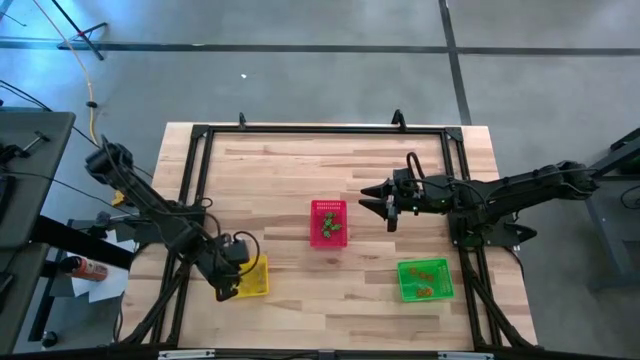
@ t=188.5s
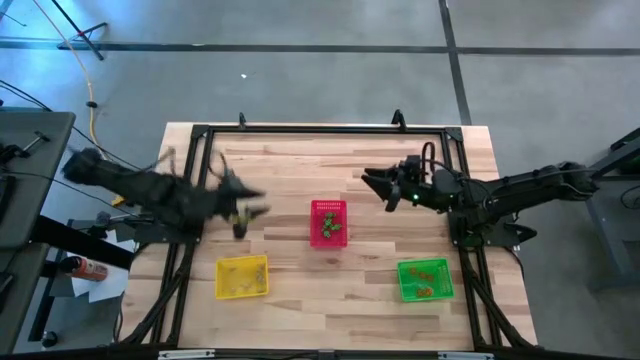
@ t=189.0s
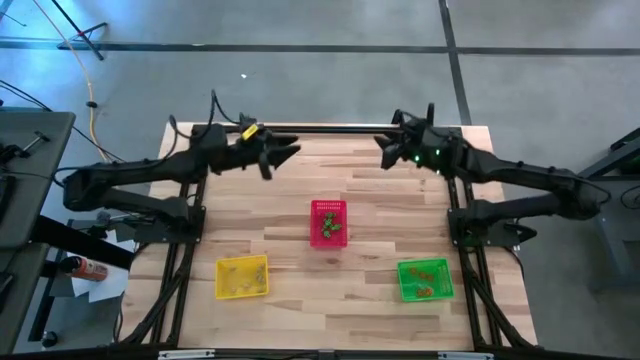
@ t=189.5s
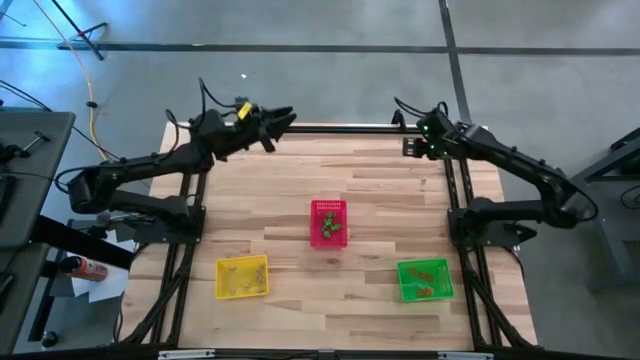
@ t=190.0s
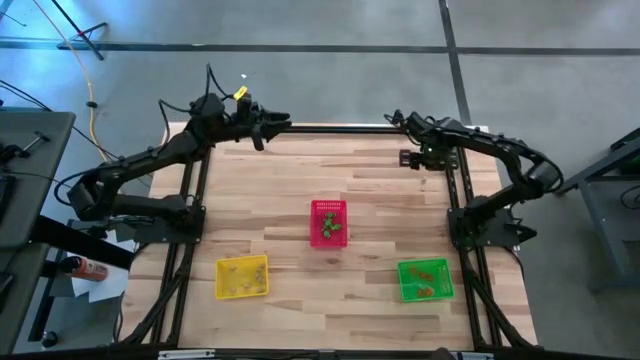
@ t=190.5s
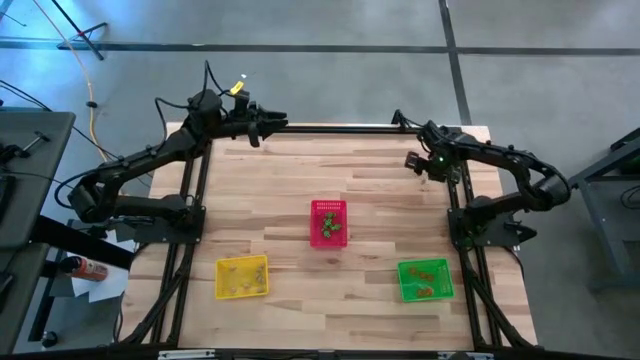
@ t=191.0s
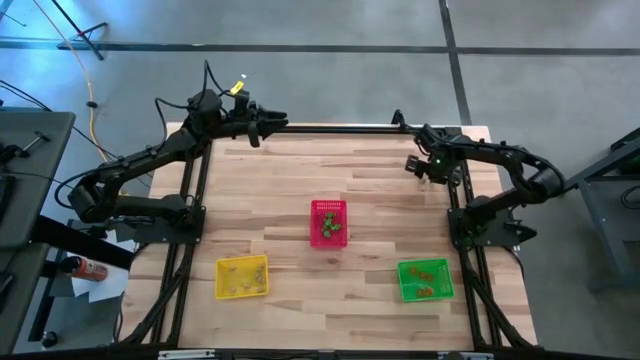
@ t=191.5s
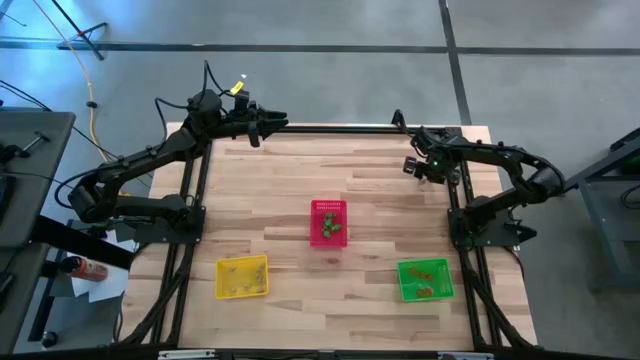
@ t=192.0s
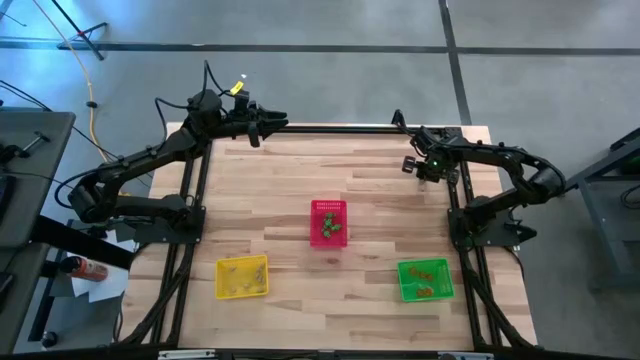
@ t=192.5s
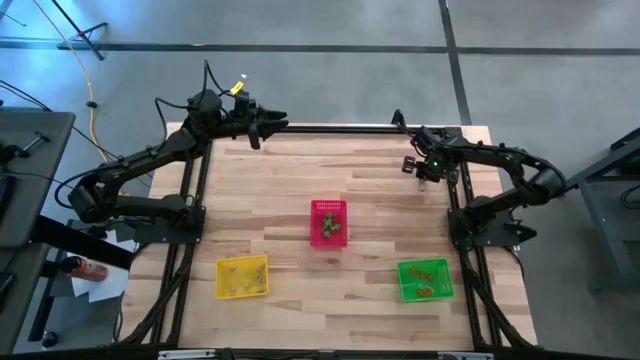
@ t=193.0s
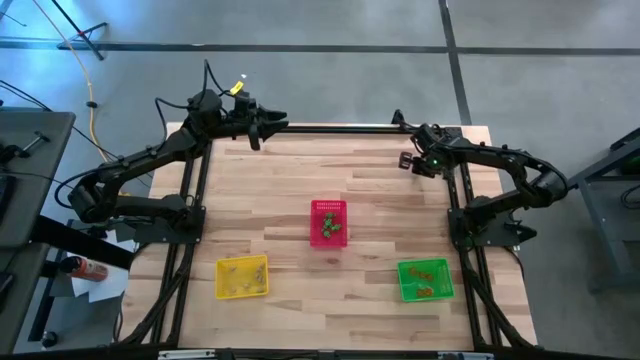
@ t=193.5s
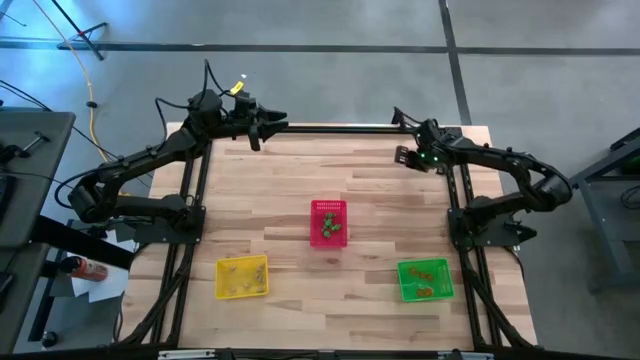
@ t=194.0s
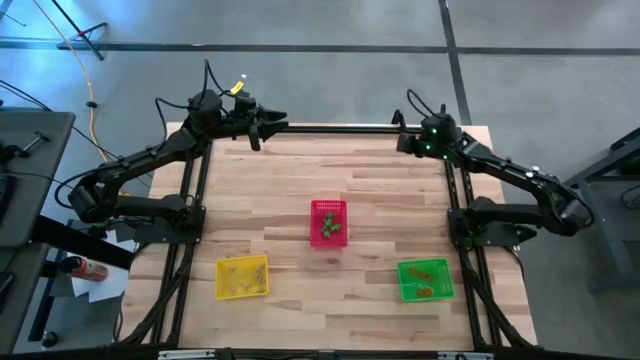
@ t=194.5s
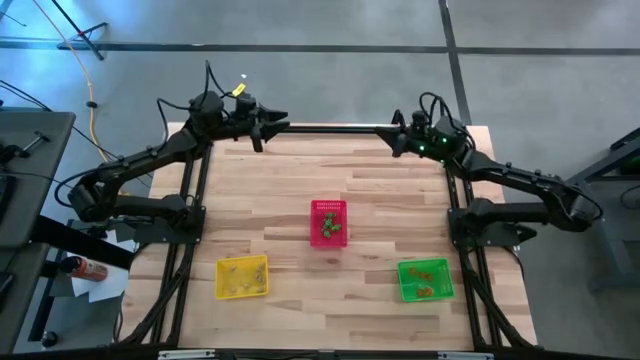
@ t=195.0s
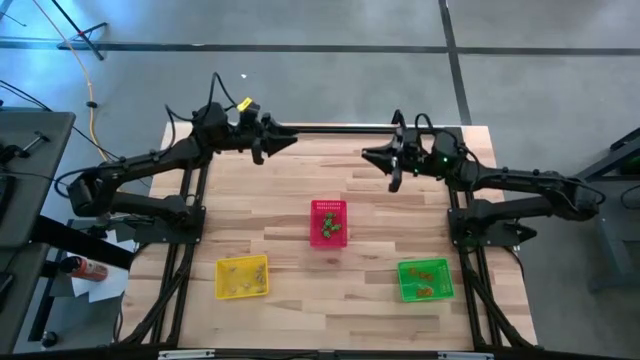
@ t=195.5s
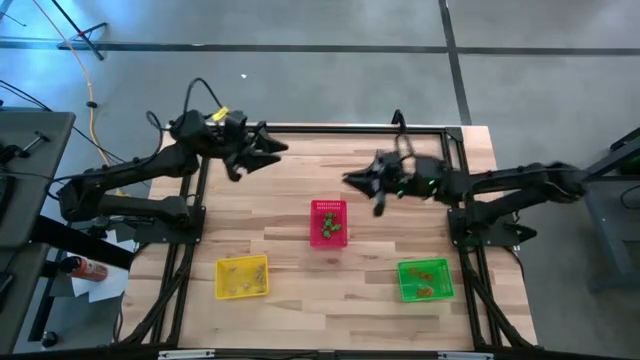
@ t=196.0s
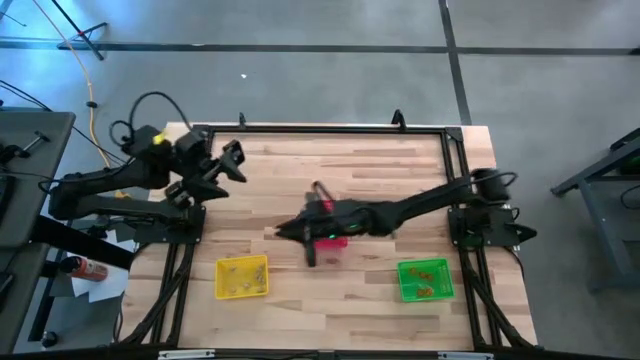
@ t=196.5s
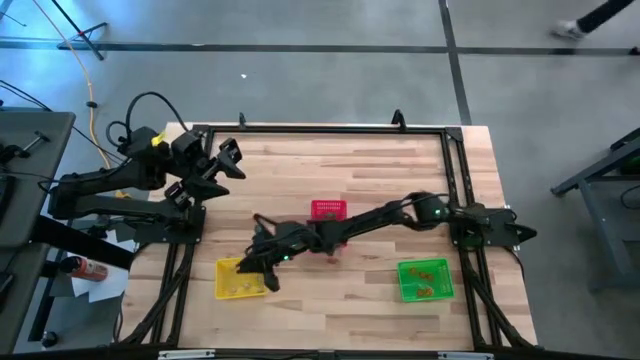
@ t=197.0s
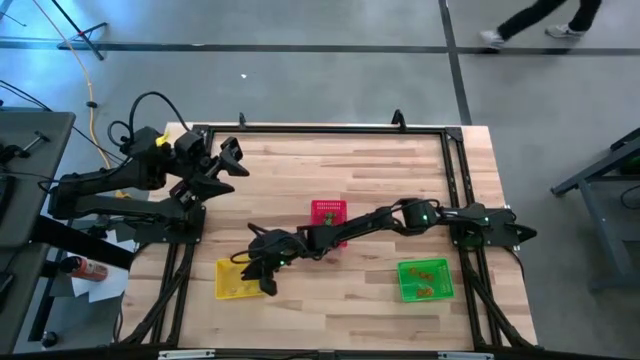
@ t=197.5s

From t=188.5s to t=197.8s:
Task: Sort Halloween decoration
Put the white skull toy into the yellow bin

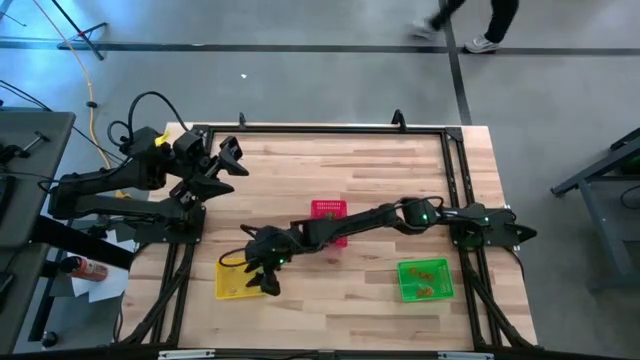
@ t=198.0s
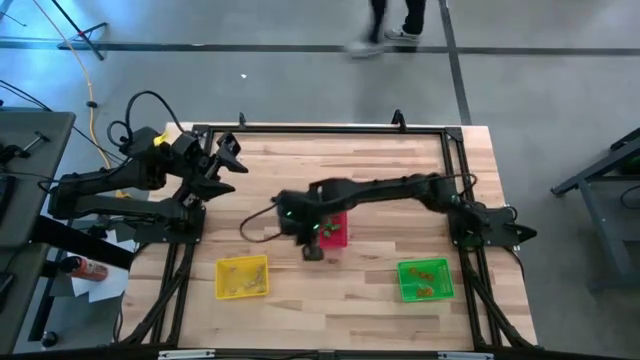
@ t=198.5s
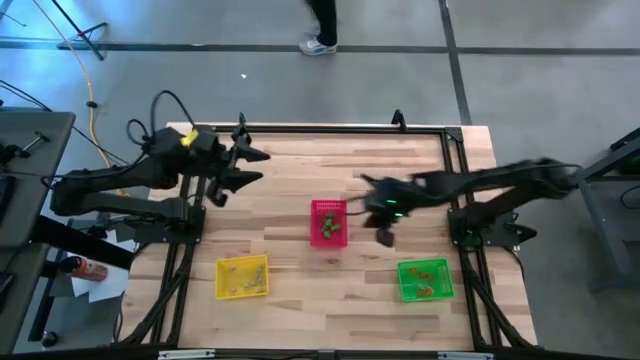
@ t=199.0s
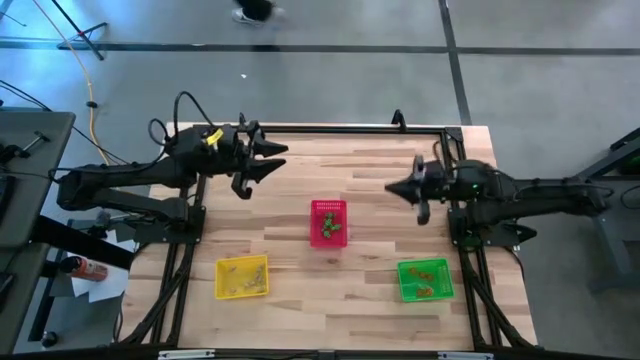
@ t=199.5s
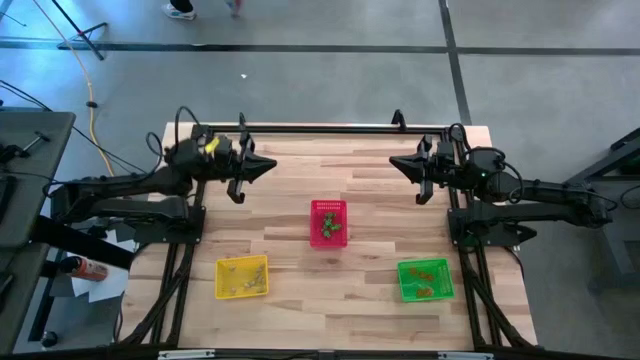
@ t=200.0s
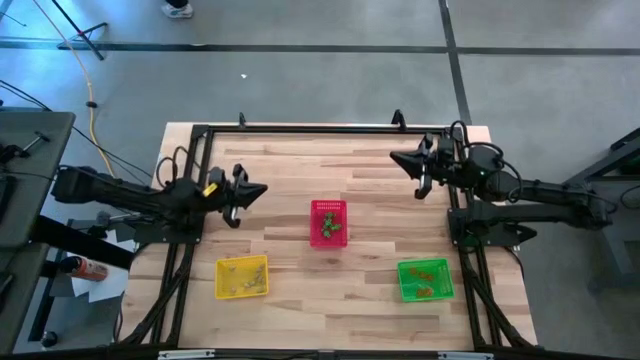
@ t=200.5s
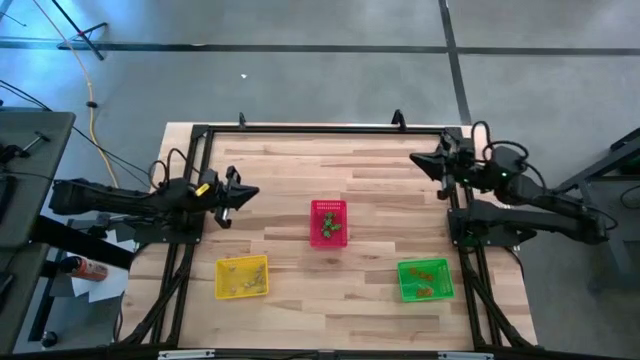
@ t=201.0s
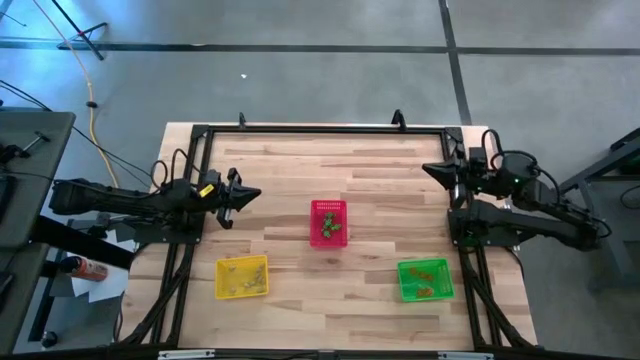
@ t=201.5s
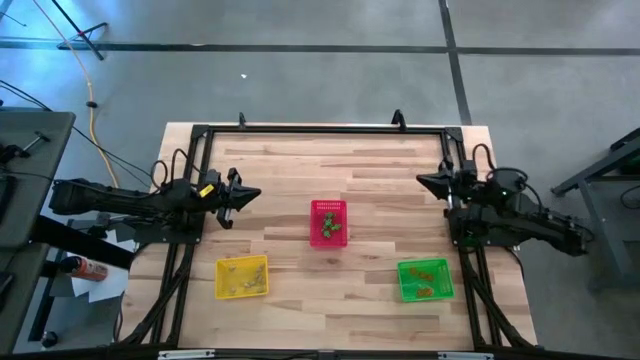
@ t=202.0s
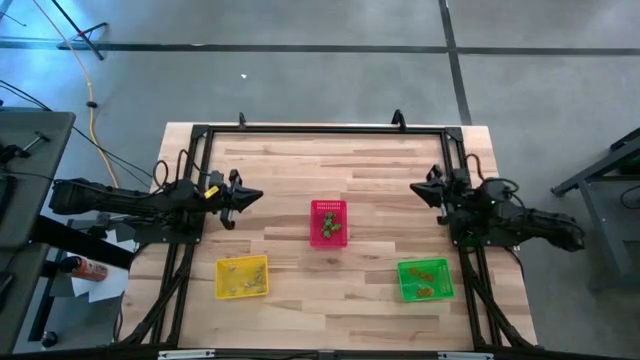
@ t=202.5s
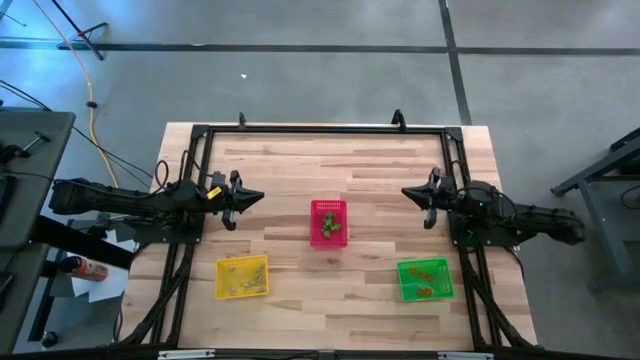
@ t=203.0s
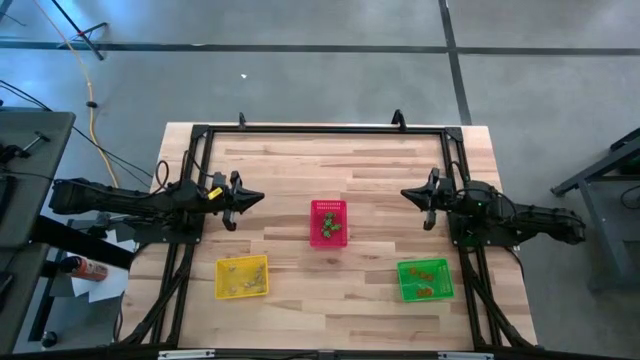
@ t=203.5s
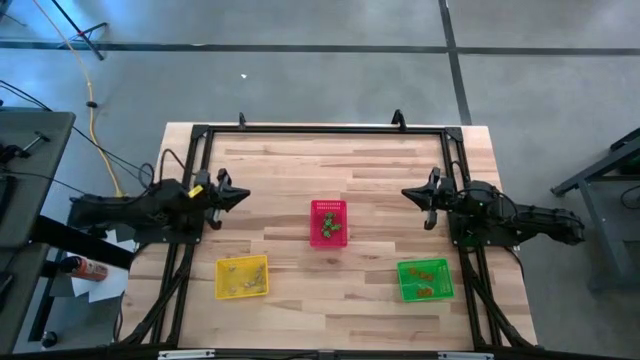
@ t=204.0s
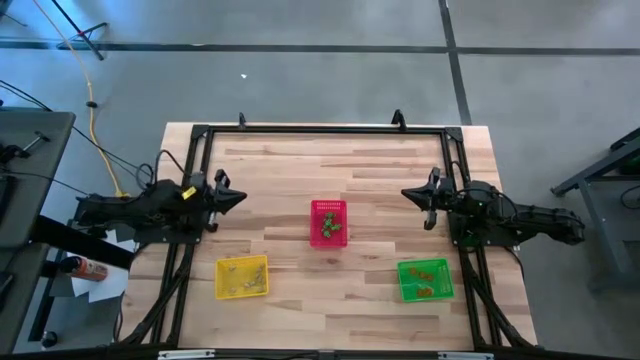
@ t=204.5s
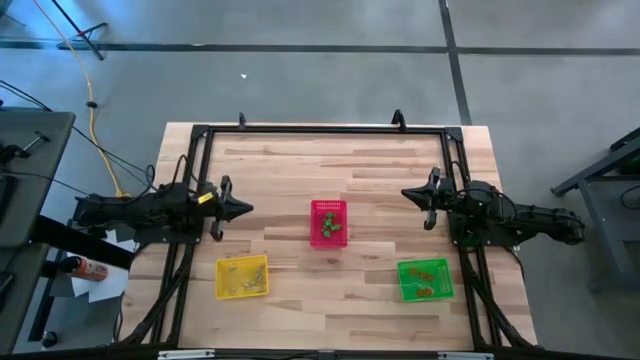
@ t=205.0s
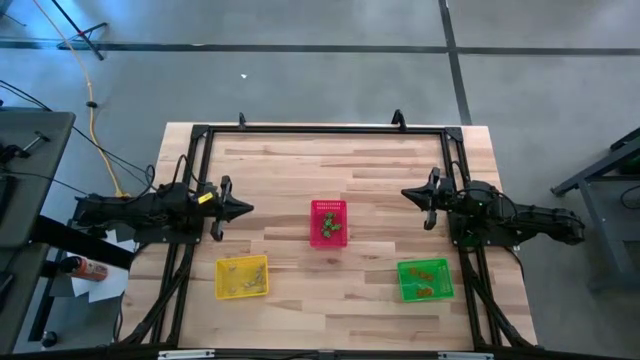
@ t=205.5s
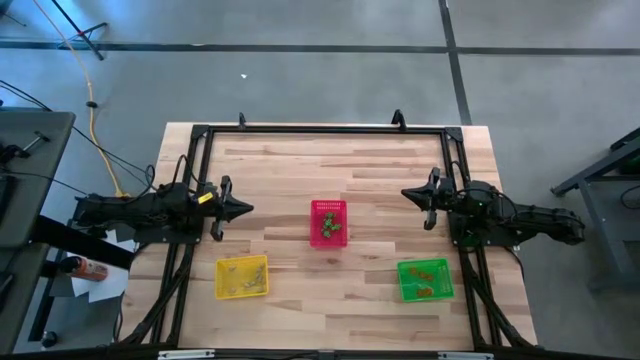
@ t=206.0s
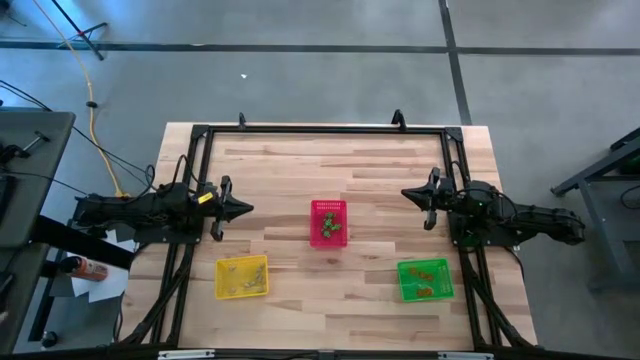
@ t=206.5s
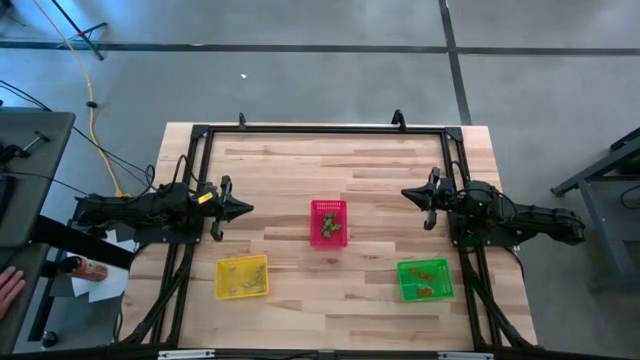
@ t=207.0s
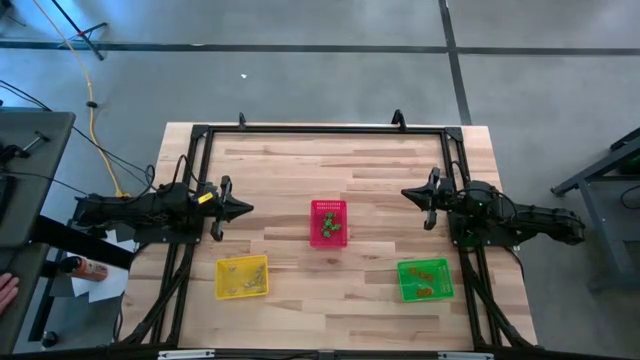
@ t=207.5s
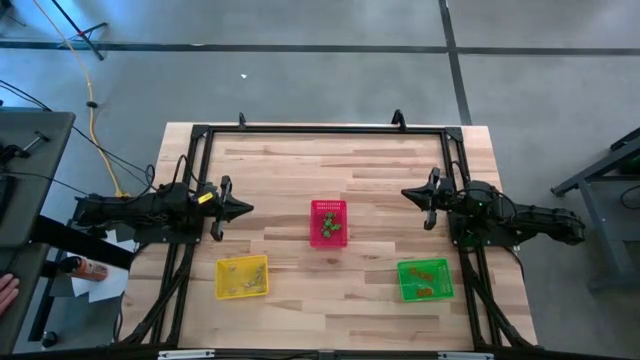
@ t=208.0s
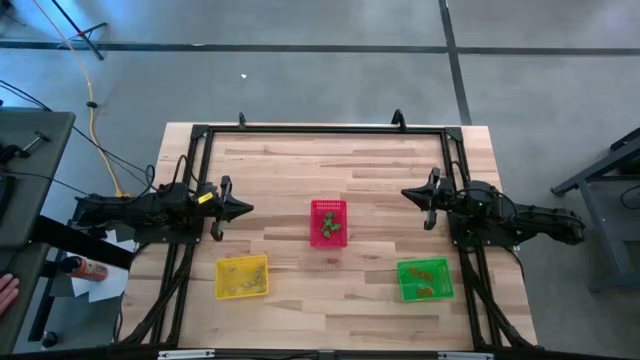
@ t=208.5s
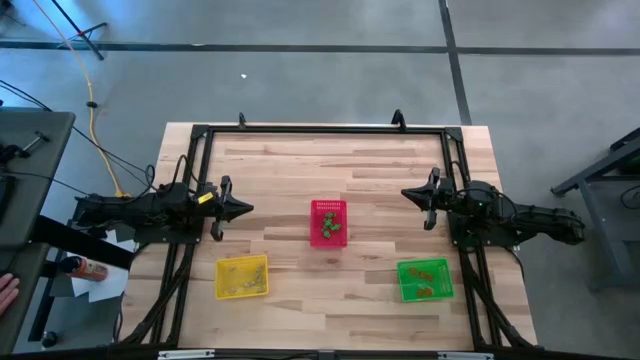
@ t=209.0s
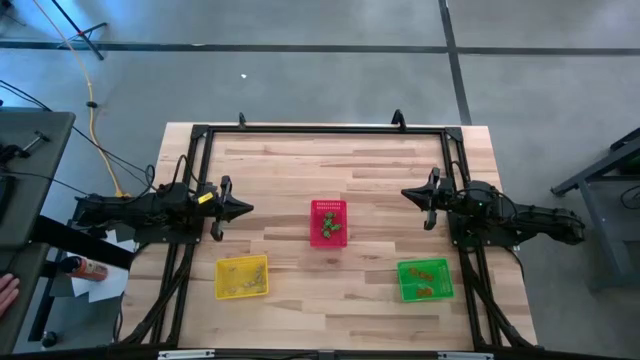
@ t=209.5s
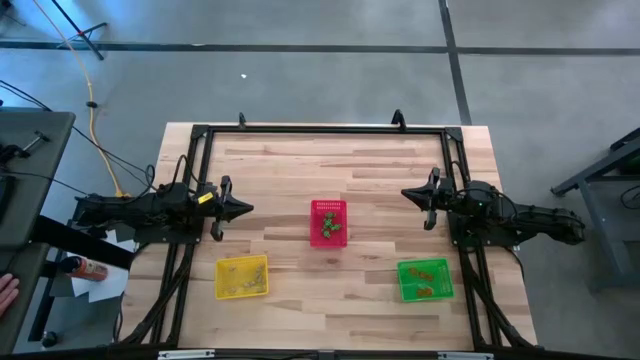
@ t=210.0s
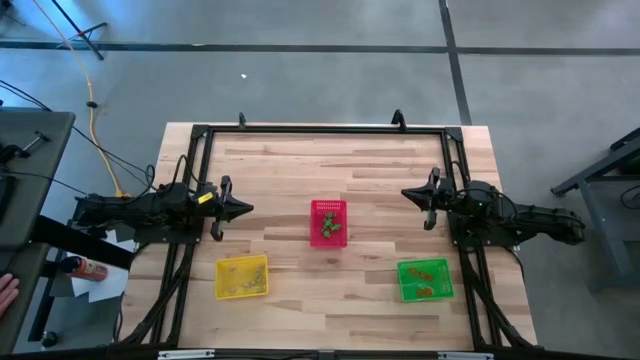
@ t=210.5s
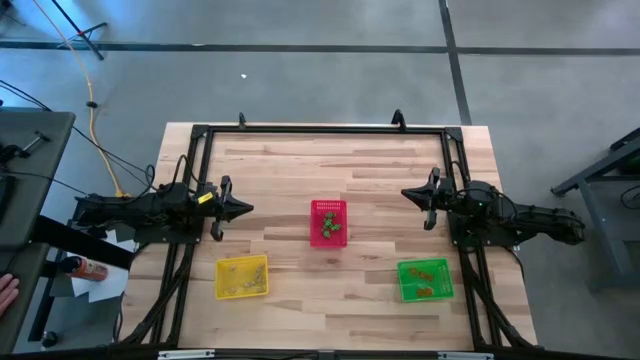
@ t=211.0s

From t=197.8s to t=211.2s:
Return to Home Position
